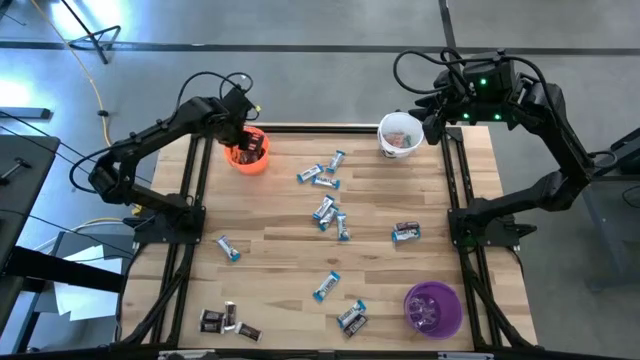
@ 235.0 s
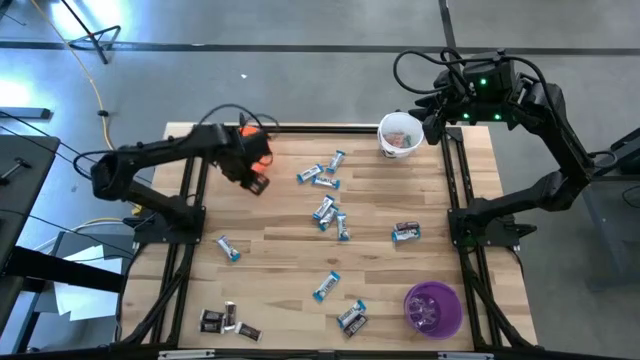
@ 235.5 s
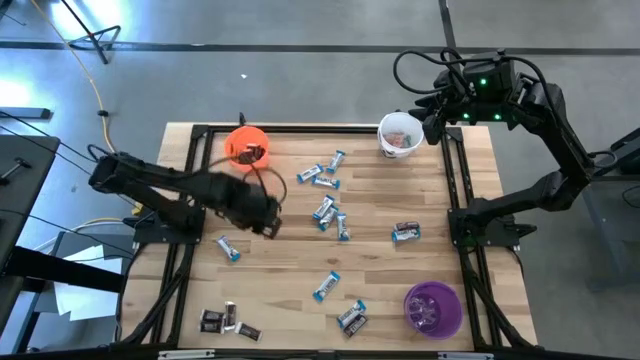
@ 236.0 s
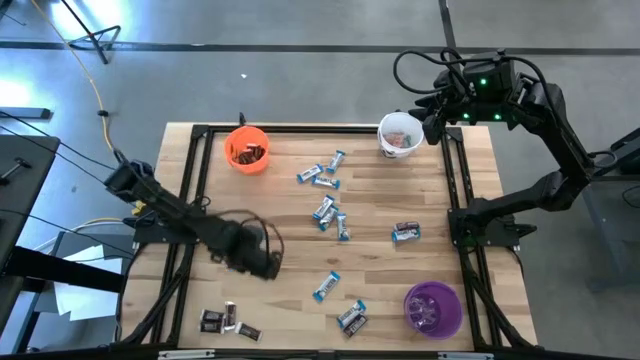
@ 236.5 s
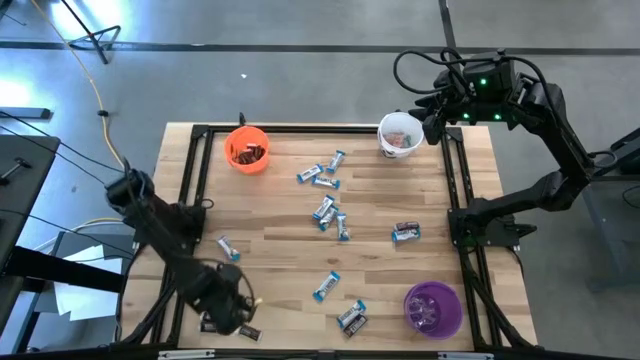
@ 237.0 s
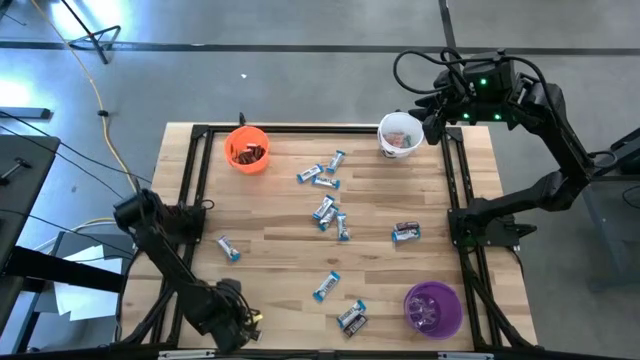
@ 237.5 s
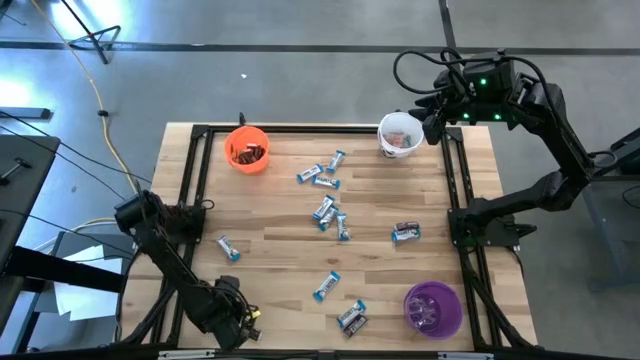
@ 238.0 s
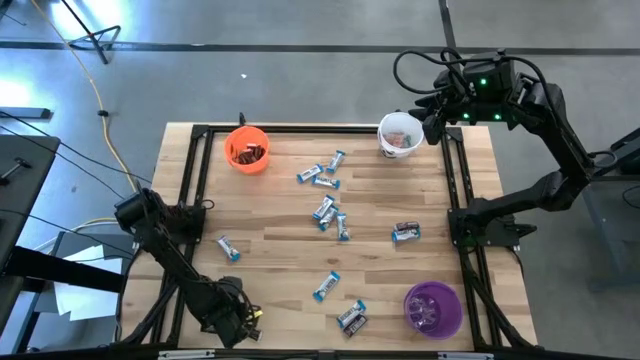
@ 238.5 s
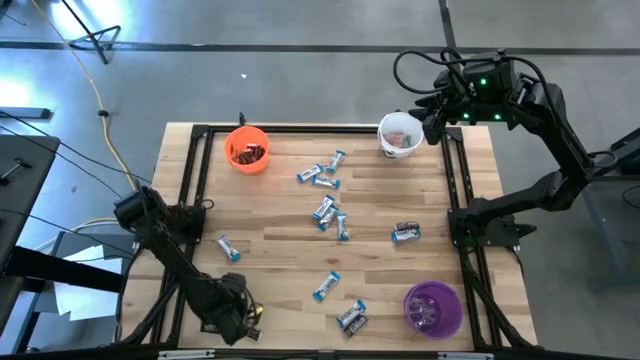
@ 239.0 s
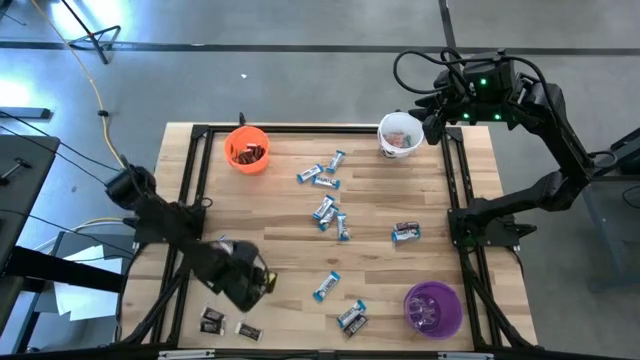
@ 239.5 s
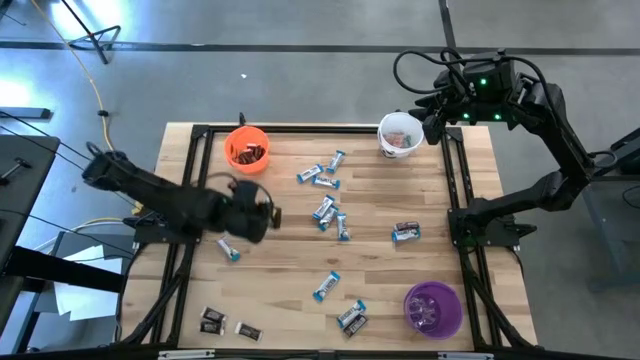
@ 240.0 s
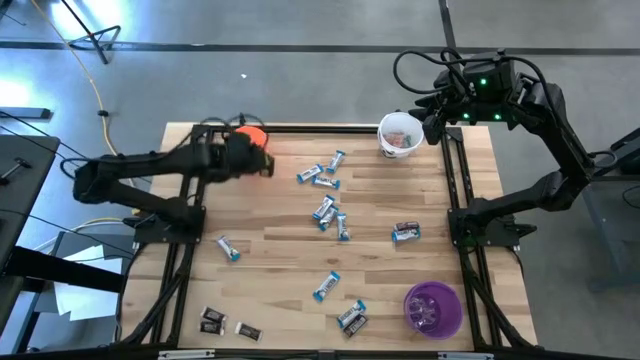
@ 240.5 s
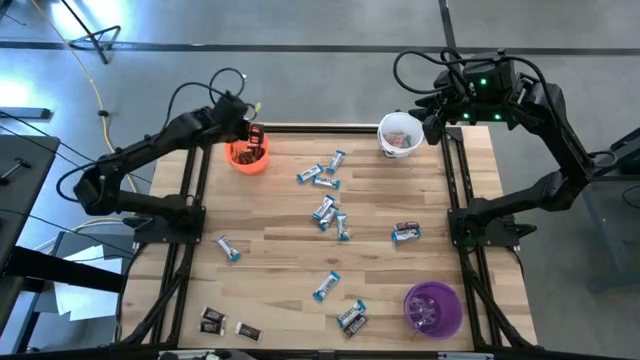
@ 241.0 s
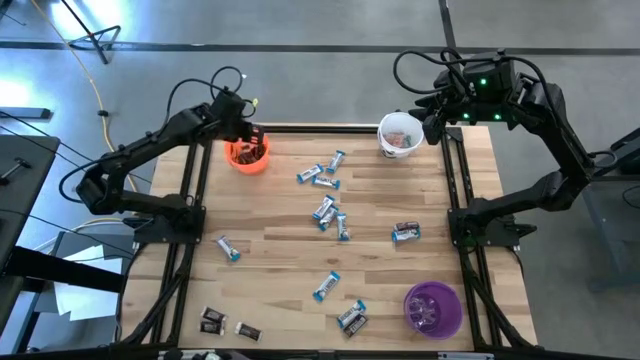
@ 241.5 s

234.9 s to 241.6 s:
Task: Sort candy
Put the brown chocolate into the orange bucket

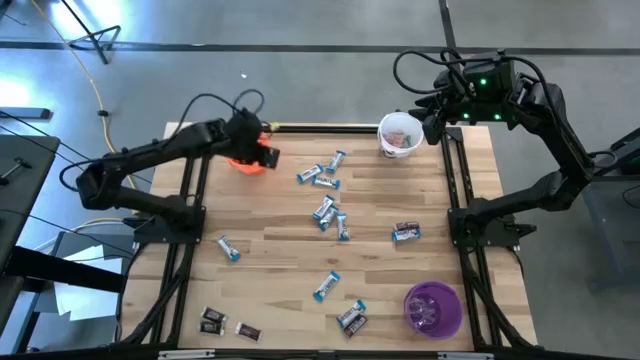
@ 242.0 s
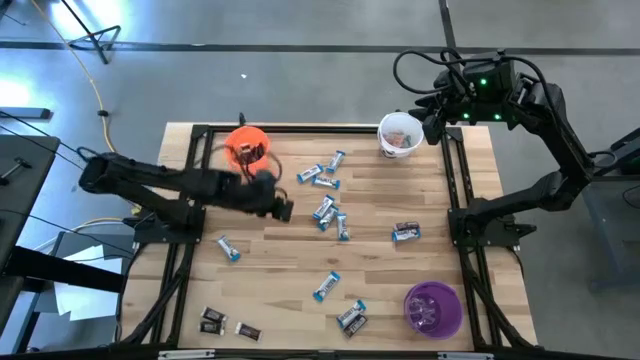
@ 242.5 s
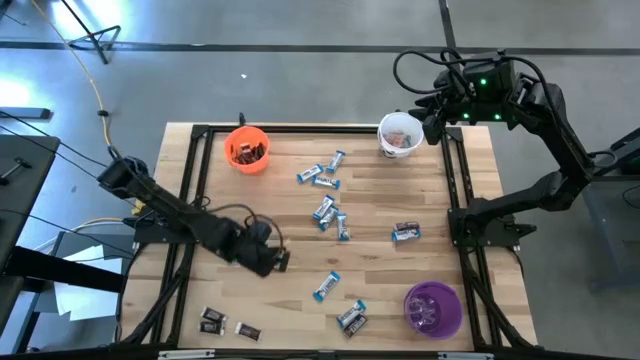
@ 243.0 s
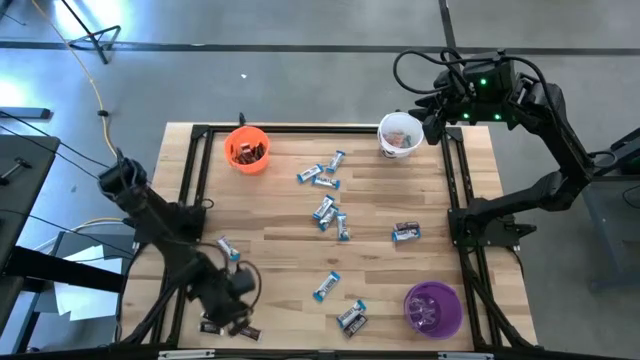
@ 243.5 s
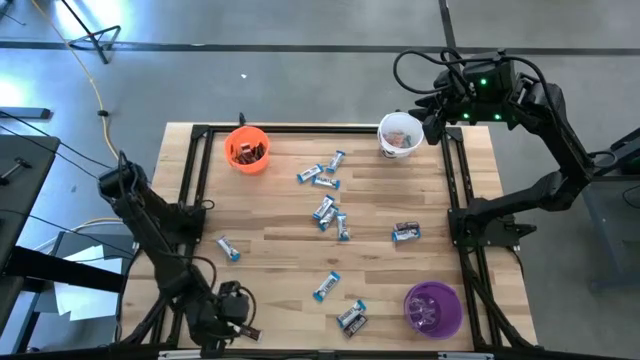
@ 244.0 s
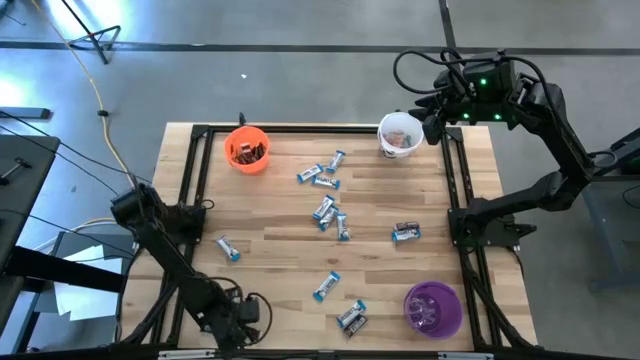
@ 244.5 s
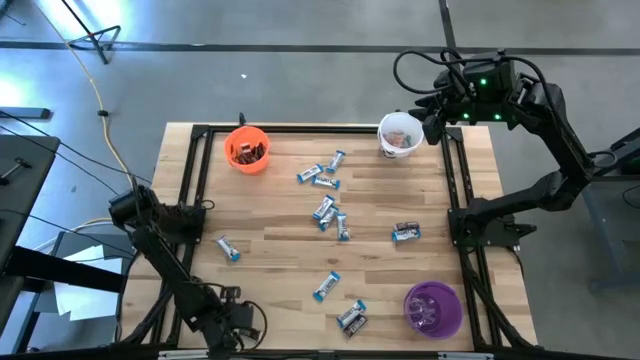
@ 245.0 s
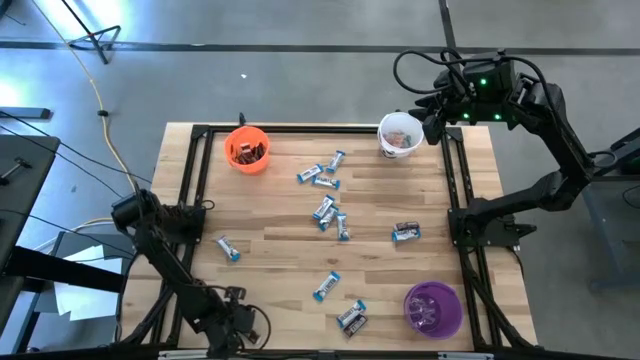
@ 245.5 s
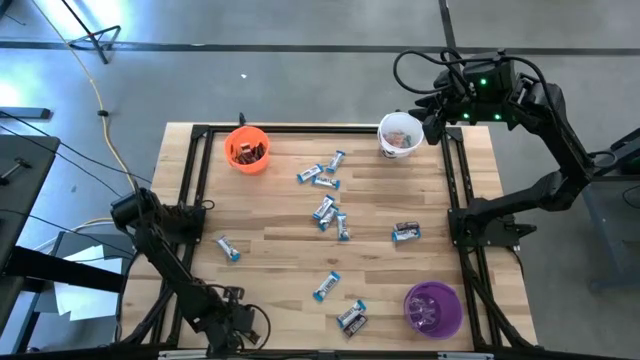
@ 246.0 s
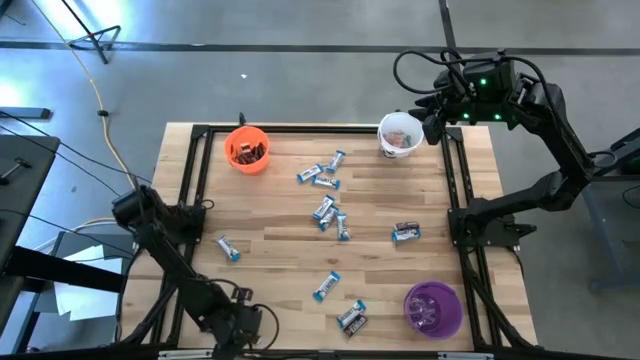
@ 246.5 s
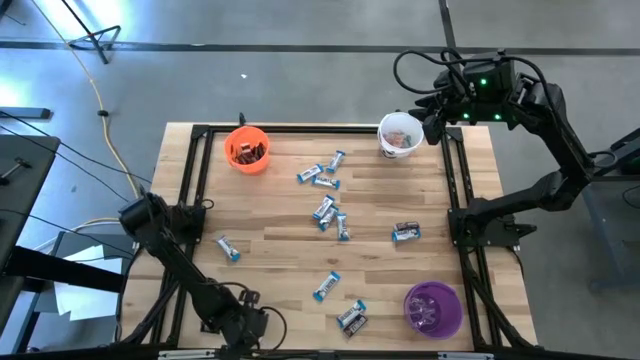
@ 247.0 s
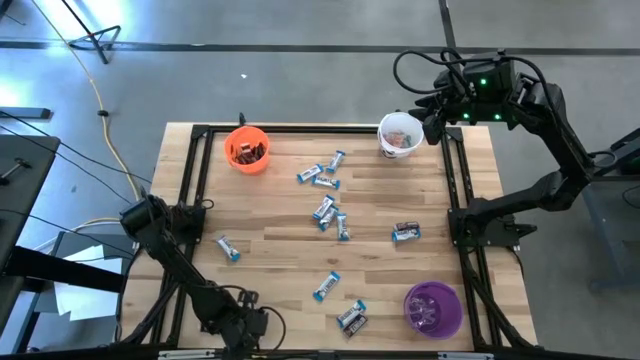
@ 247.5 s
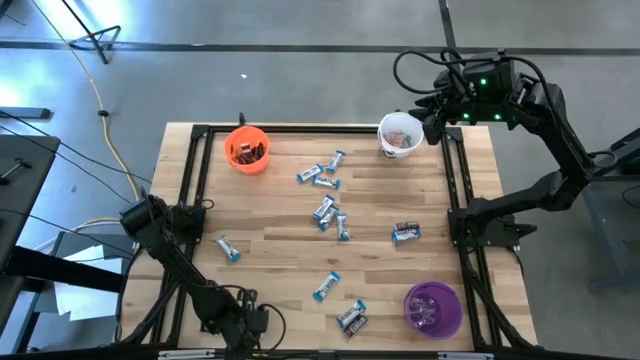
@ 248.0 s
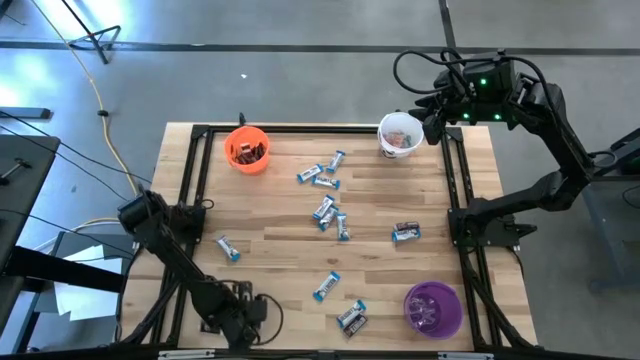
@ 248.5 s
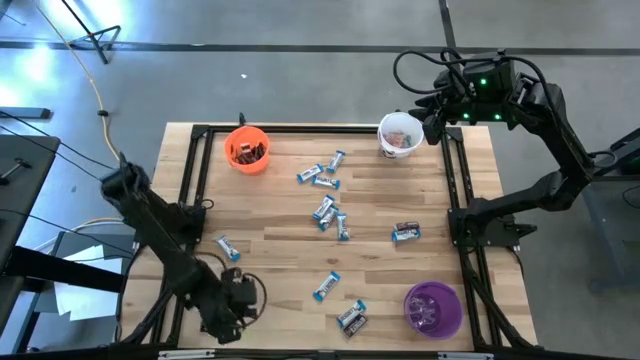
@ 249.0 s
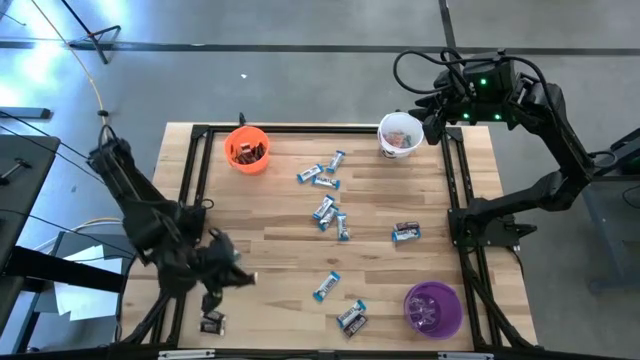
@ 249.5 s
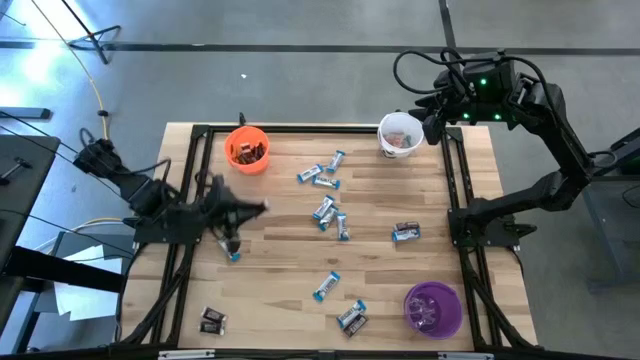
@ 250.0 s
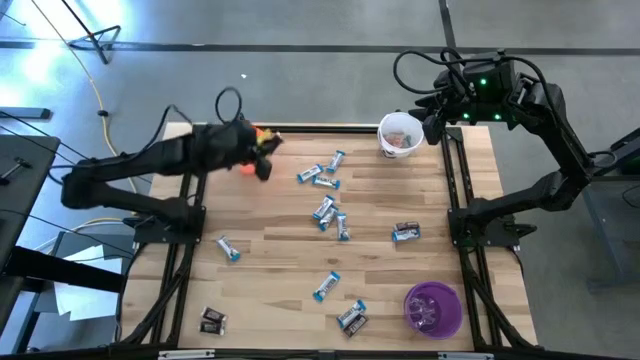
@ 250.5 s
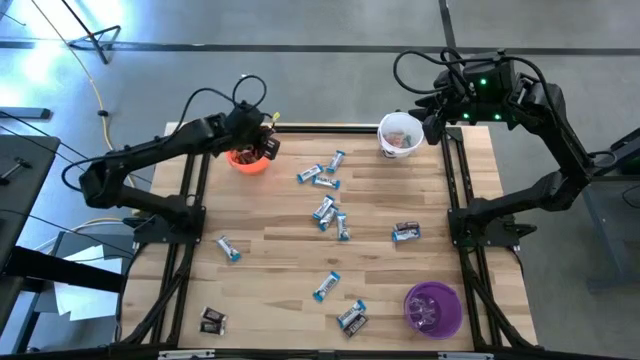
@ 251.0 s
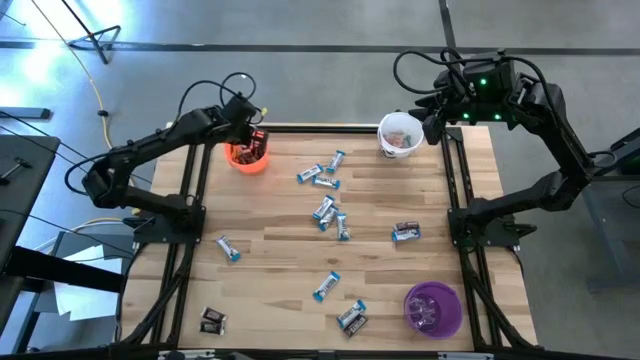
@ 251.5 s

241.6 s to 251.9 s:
Put the brown chocolate into the orange bucket

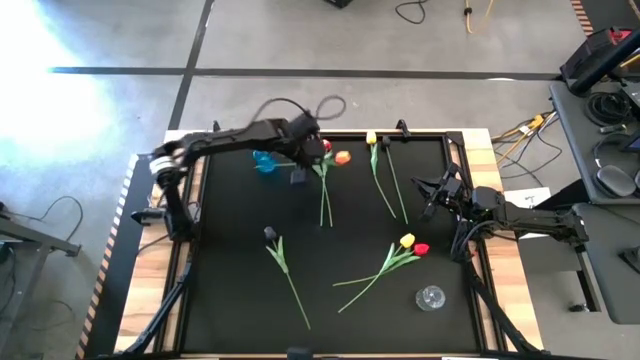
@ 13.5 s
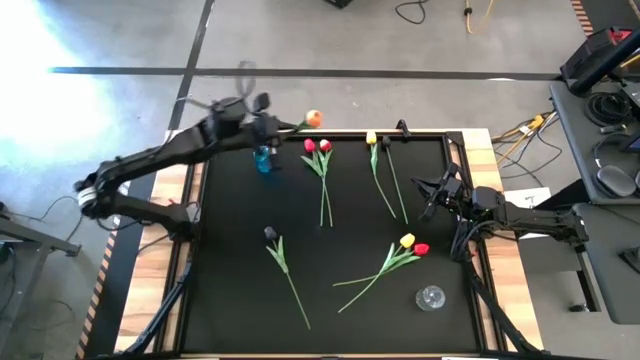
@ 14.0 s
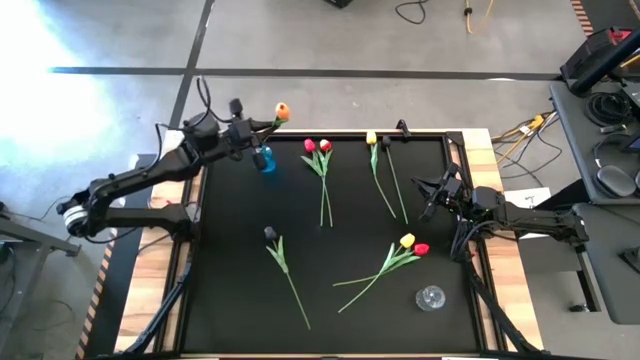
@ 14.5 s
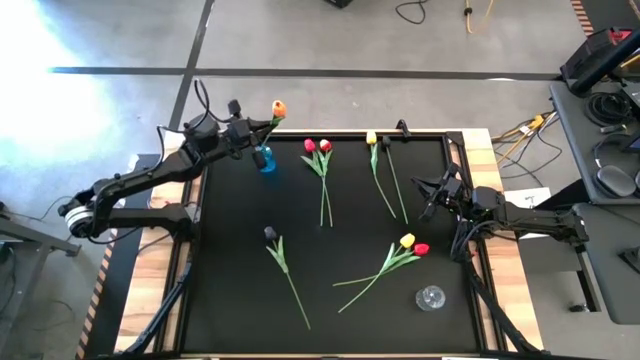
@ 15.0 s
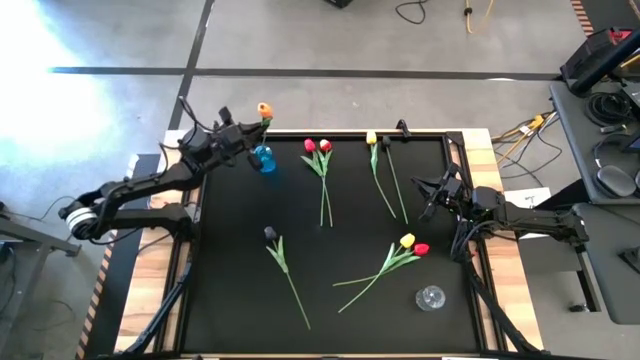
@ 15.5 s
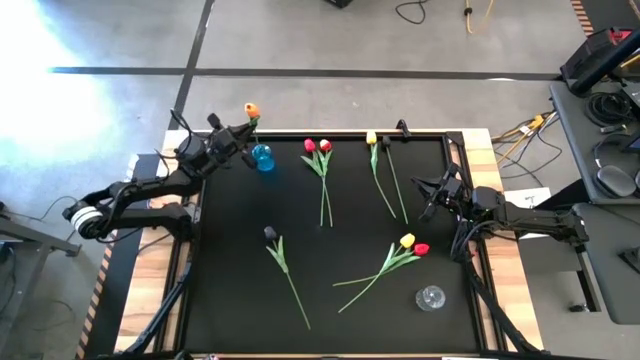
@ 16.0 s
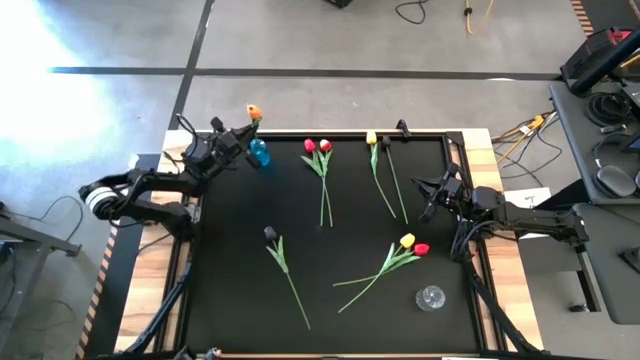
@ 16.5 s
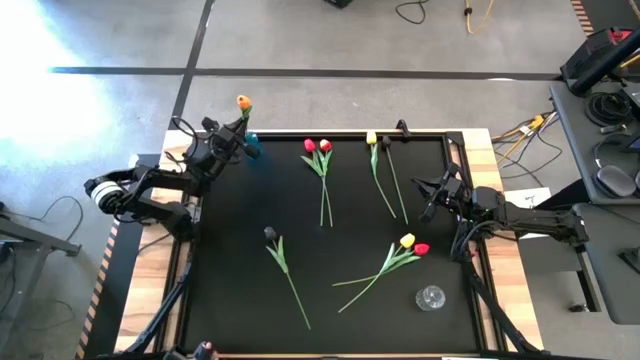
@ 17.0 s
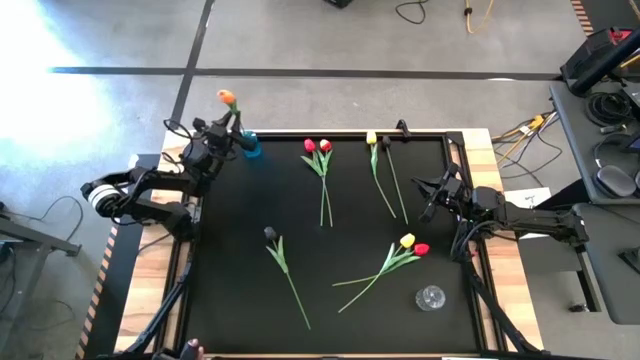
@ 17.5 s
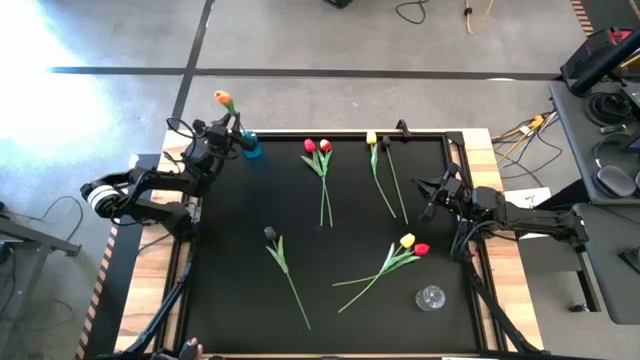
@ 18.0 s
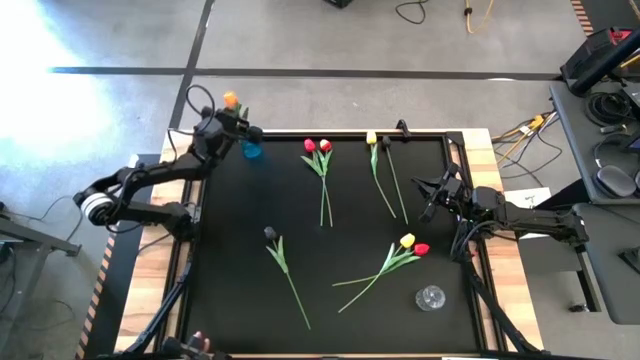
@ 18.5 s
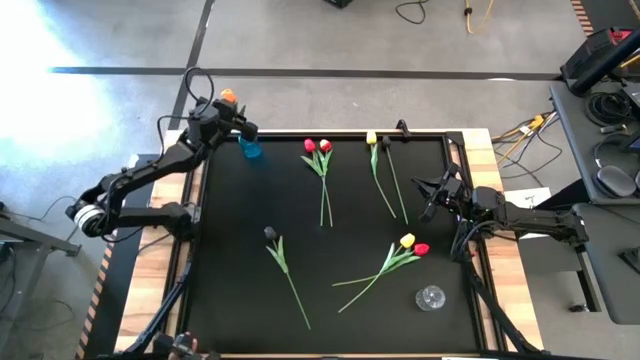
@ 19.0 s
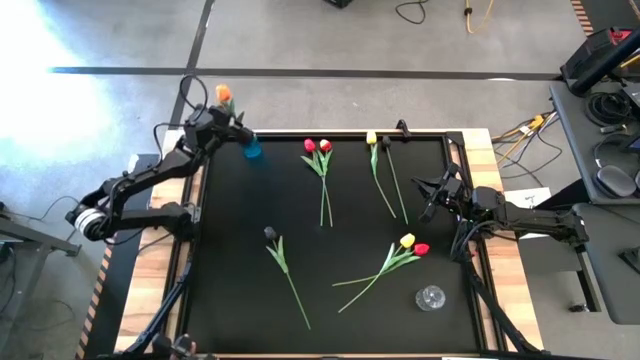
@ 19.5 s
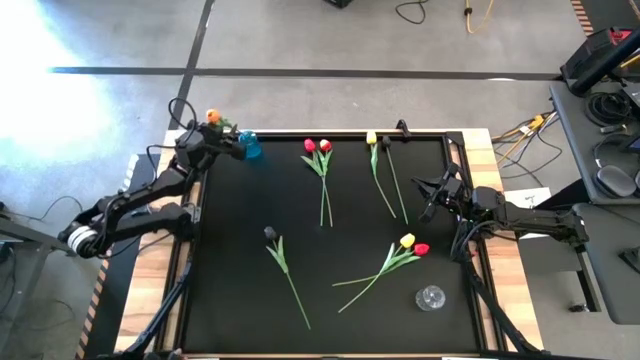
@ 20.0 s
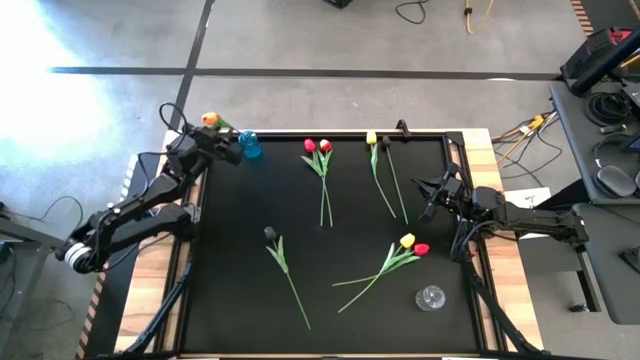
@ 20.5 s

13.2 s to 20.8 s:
Task: Sort flowers into vase by color
Put the orange flower into the blue vase
